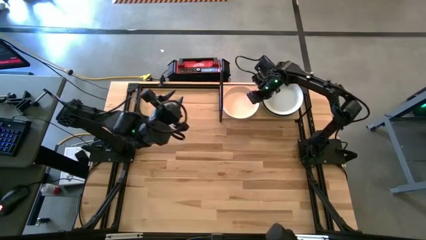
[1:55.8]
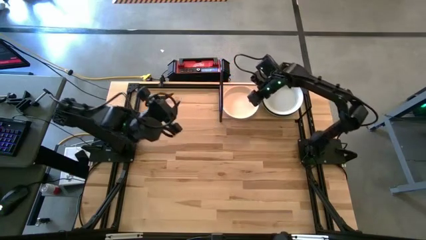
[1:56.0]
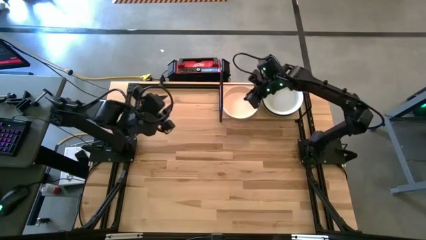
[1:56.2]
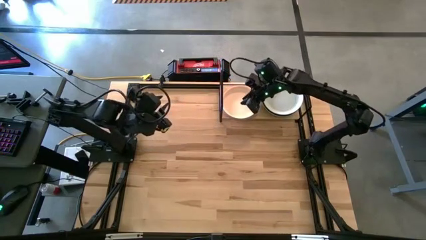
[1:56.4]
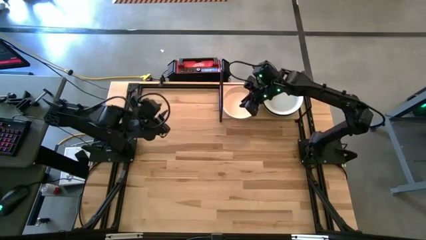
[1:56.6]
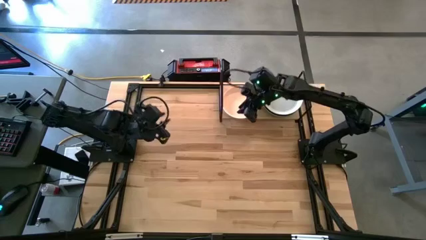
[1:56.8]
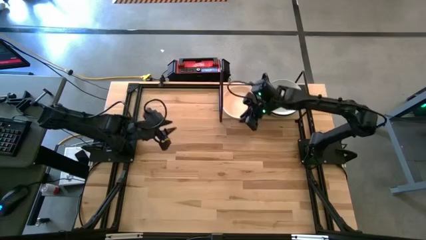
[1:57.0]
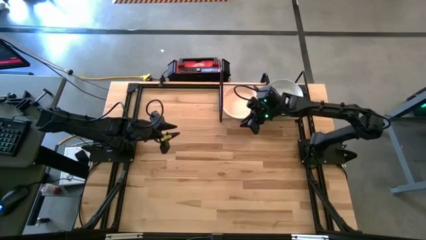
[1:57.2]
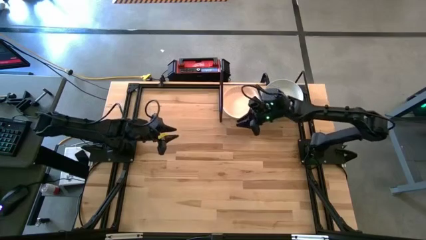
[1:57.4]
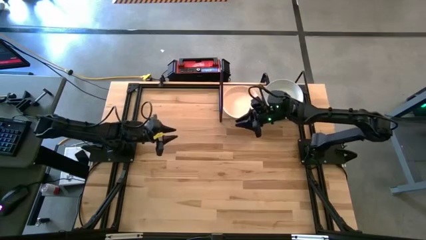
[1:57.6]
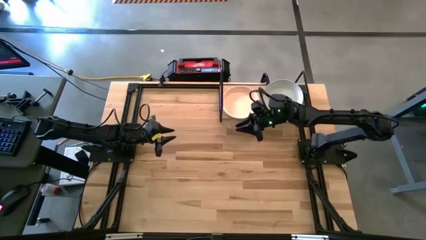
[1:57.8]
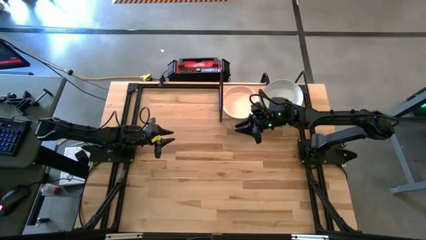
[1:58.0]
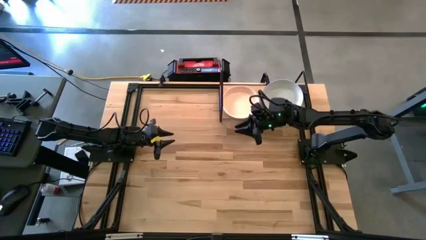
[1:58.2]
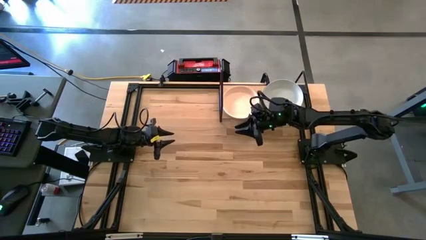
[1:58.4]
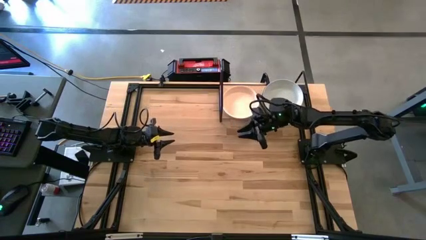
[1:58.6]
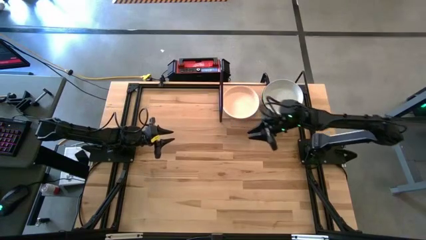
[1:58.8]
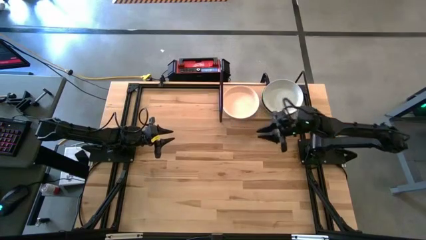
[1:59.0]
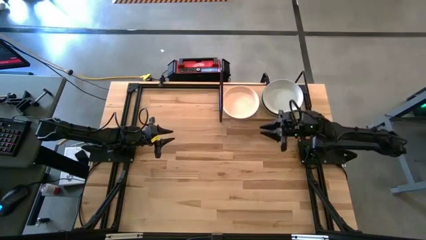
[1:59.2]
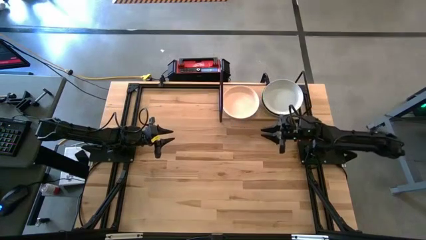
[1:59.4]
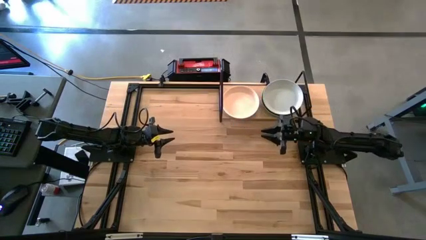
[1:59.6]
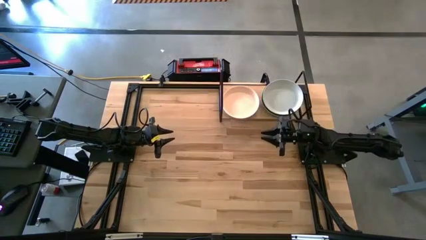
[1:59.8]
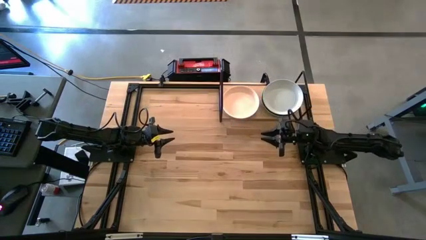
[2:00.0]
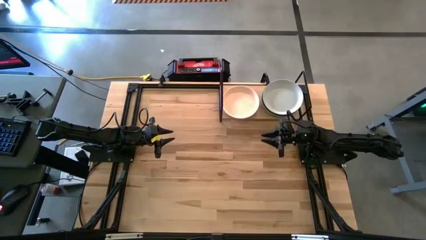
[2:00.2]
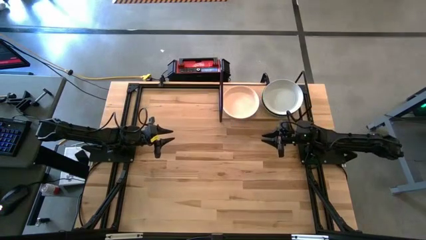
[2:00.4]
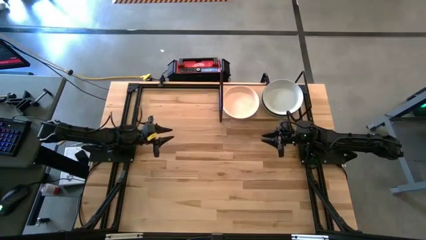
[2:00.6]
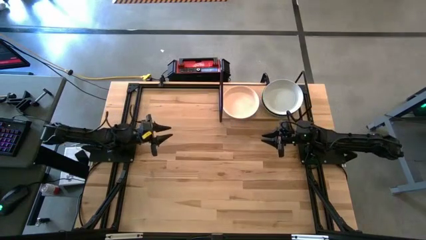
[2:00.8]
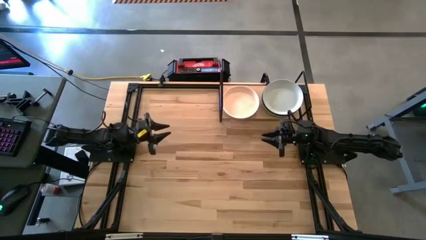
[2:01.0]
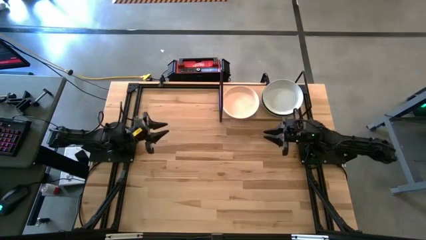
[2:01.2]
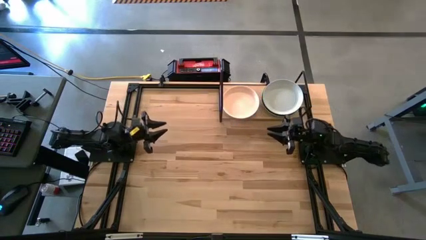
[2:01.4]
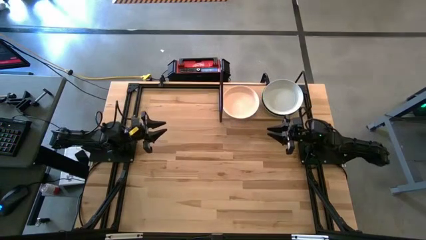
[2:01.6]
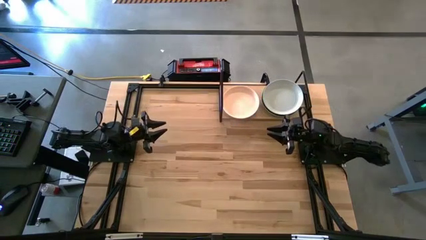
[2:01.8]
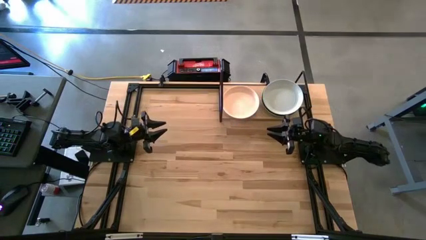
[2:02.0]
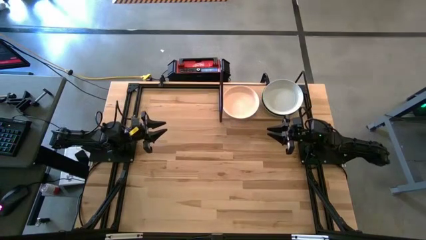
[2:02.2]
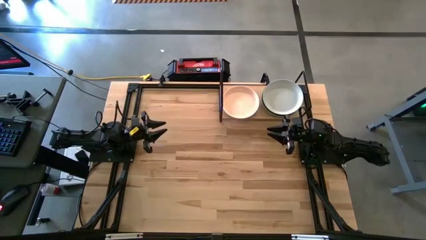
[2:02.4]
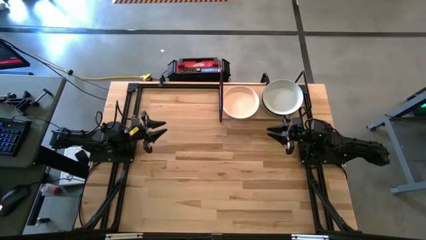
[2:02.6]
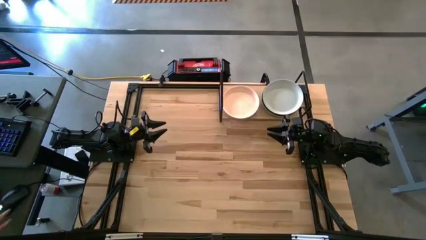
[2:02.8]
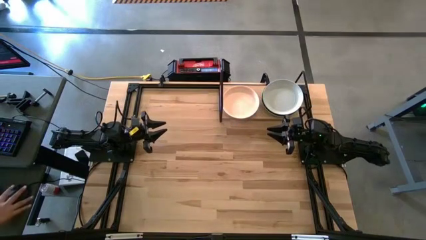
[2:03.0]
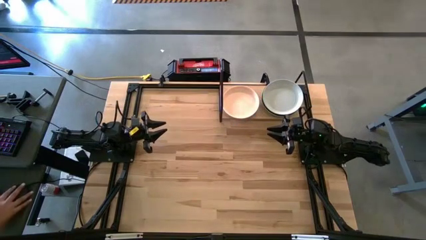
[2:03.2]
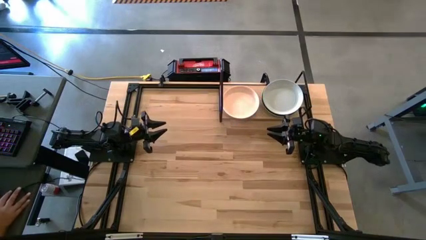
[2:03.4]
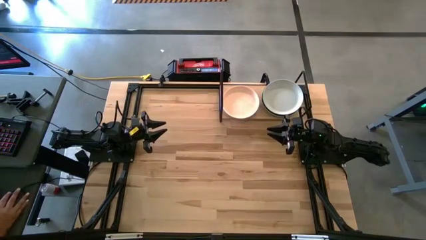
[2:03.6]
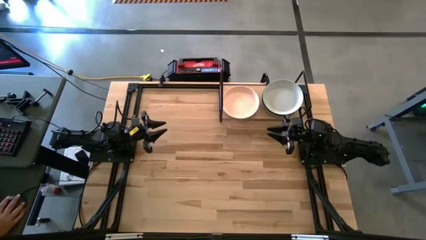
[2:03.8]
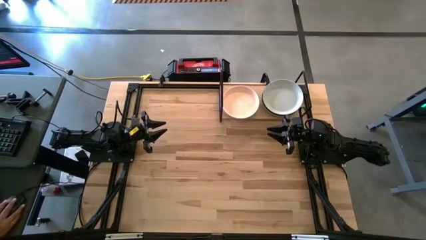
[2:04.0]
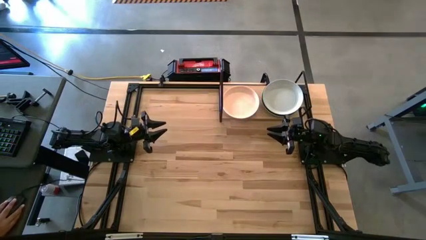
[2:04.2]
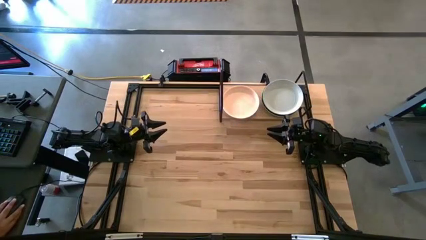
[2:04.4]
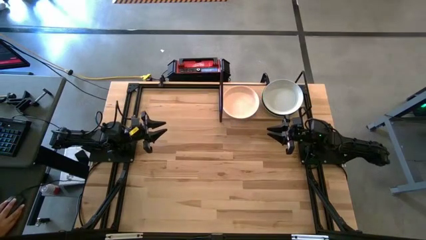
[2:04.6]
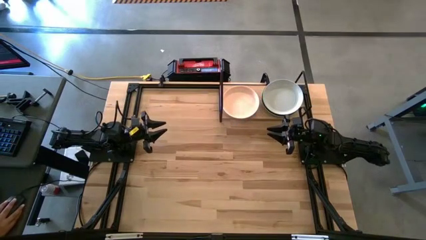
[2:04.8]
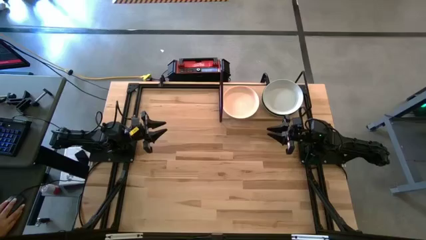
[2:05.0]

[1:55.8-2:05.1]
Task: Place and stack plates onto a shelf
Return to Home Position

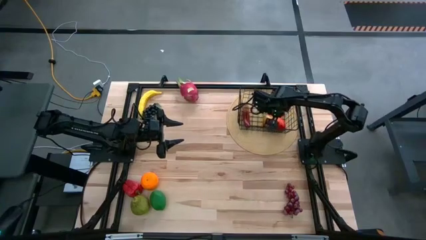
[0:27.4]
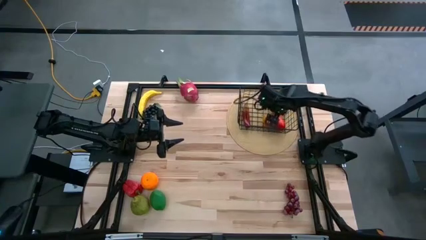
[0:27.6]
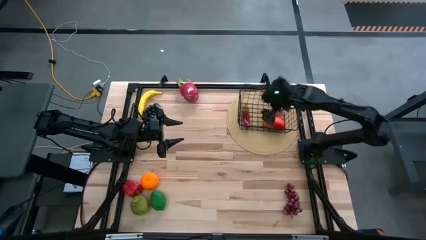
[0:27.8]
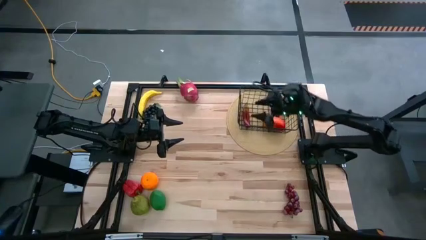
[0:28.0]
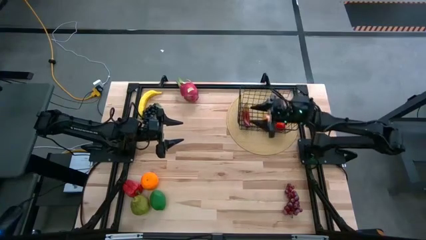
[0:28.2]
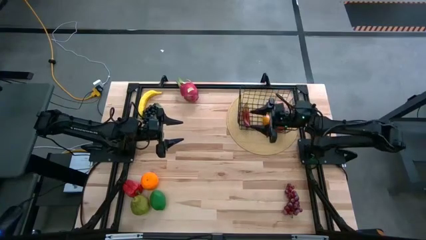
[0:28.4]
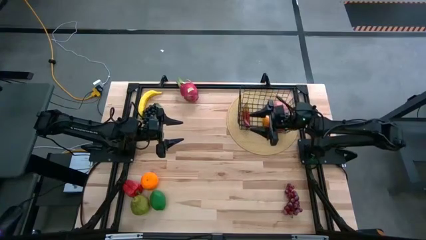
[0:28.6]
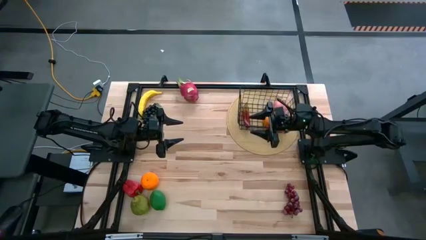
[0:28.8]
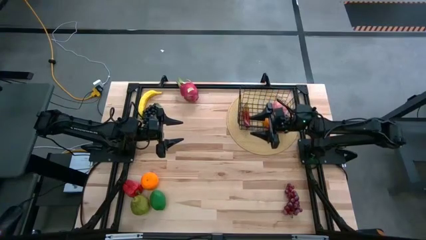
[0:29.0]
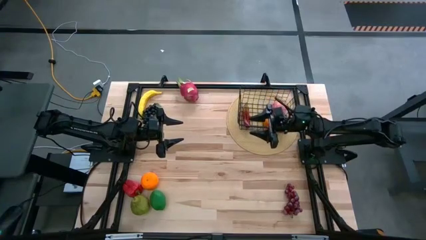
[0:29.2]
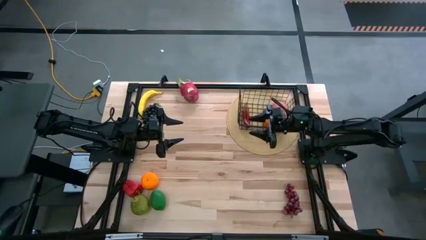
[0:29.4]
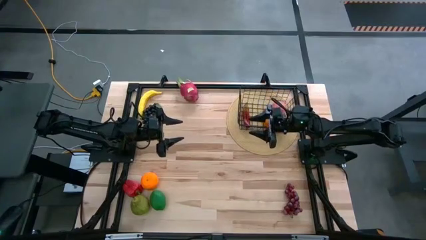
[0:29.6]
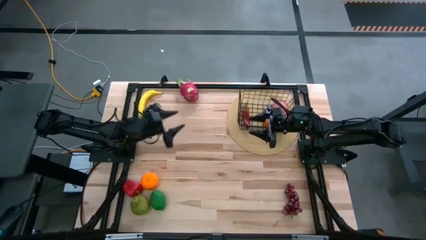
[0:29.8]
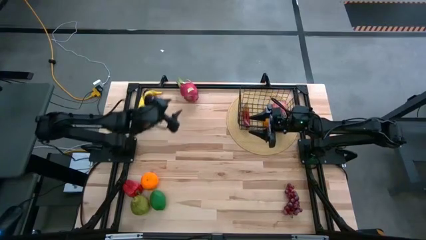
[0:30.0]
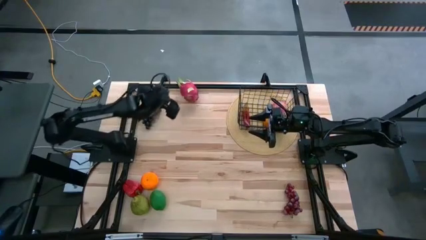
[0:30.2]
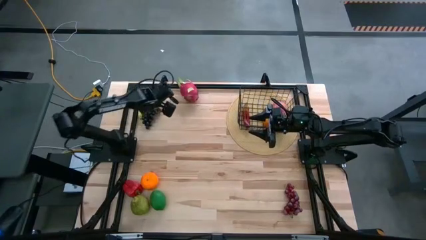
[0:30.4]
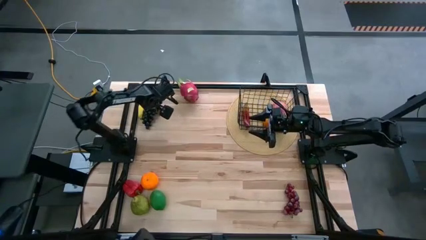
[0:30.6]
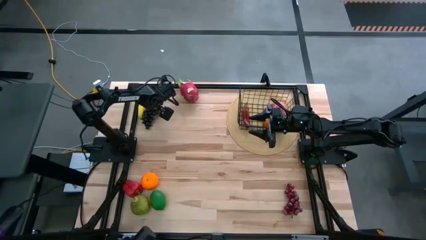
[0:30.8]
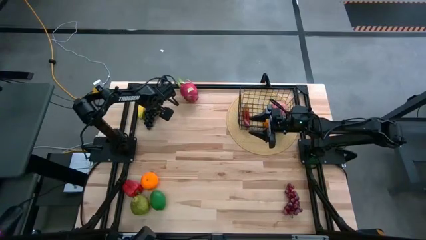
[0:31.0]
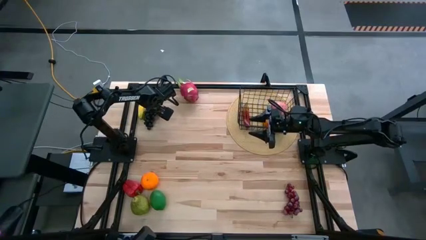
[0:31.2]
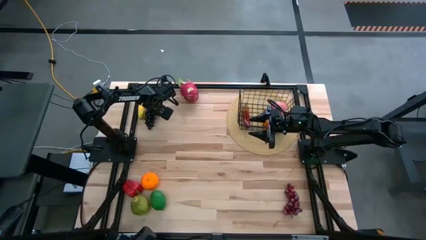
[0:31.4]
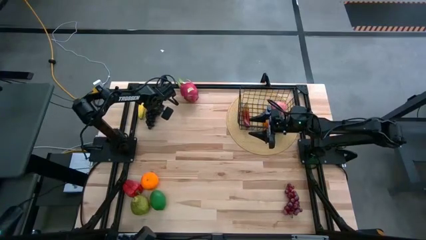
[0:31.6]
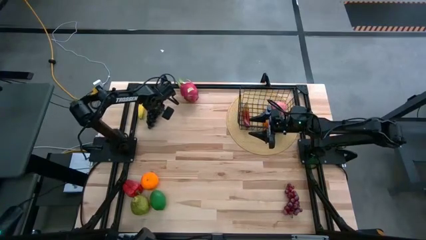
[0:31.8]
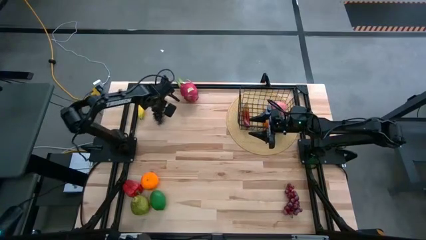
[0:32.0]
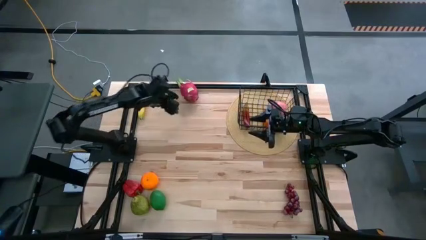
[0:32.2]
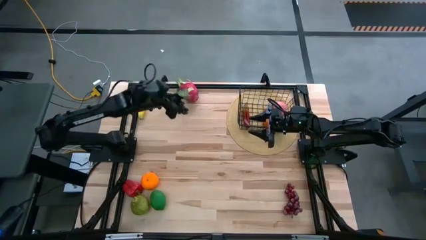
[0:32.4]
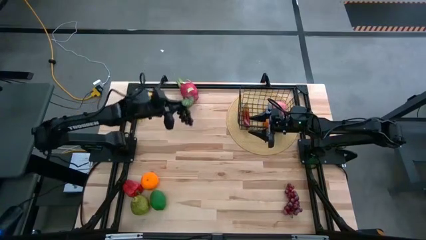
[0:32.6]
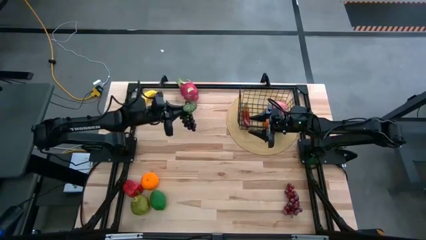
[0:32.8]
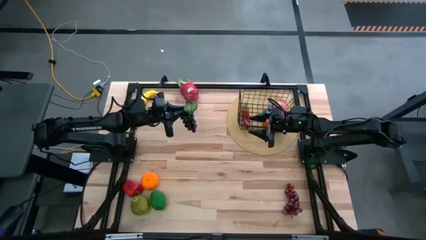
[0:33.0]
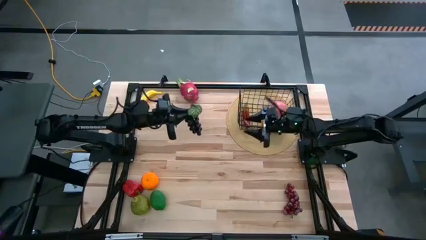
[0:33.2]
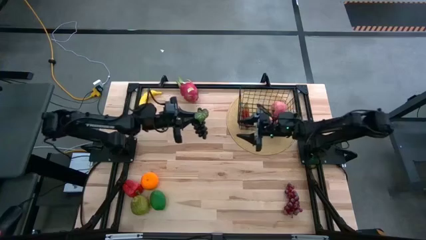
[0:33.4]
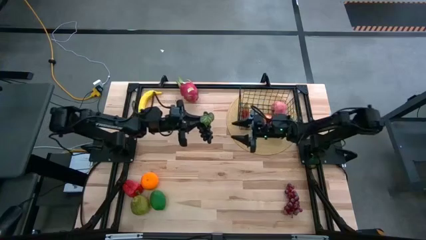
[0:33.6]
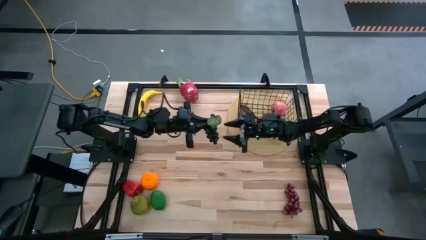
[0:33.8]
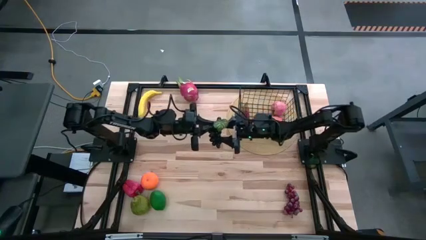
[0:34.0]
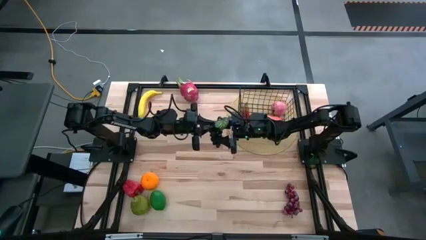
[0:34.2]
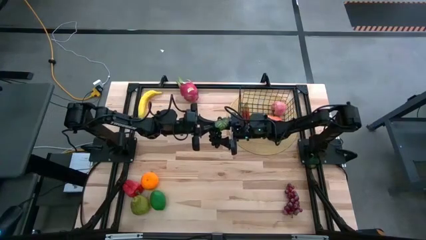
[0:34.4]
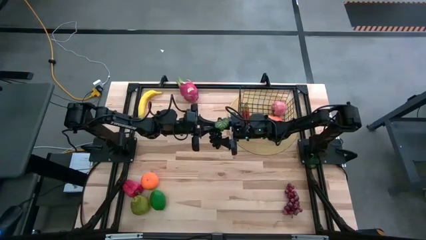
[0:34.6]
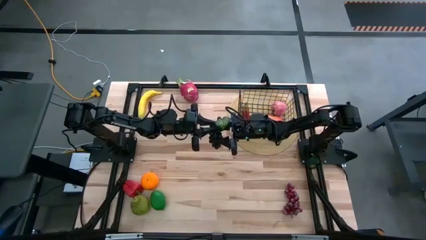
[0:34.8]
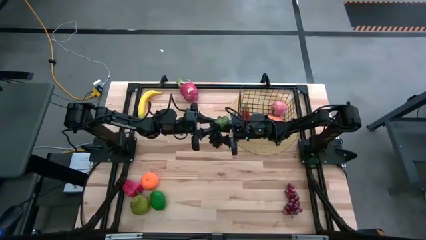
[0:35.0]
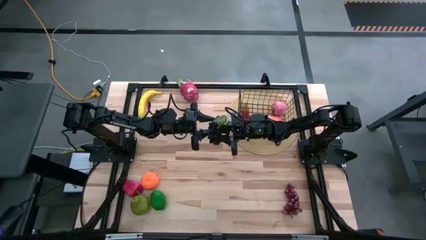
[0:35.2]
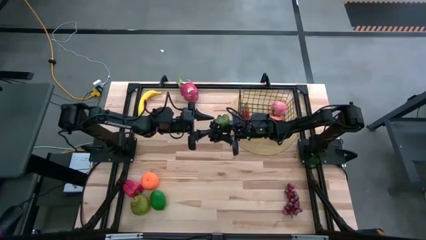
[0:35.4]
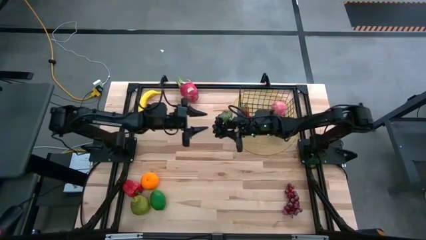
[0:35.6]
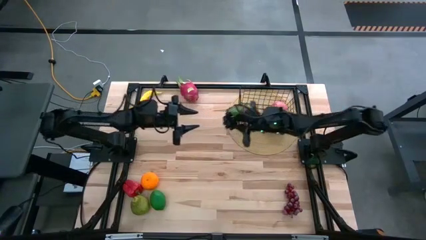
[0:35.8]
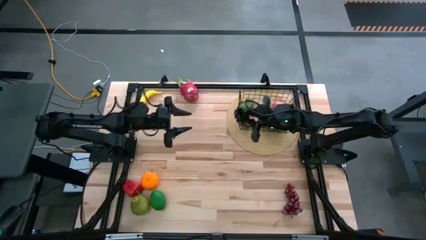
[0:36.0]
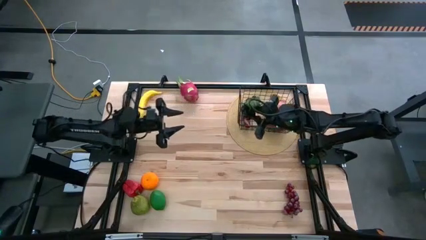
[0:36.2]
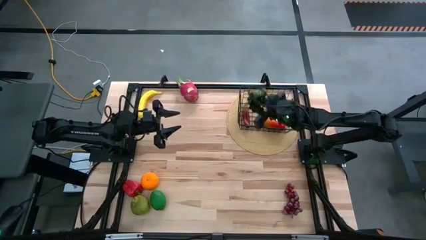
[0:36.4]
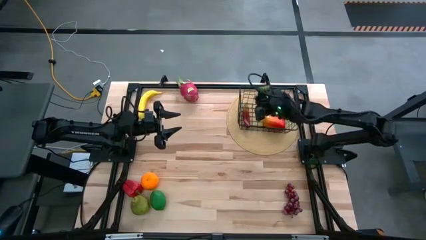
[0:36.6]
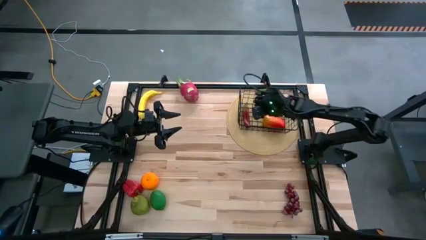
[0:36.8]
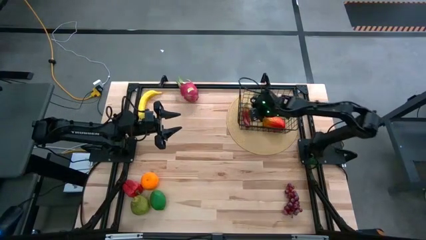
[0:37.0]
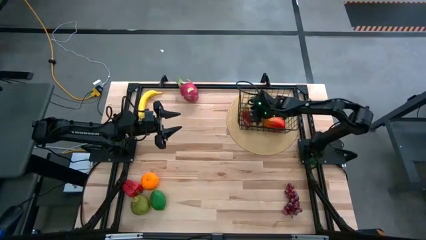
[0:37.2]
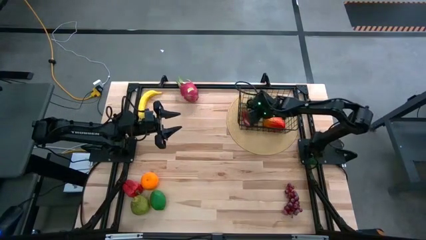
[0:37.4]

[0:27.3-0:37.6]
Task: Build produce basket
Put the black grapes into the wire basket
